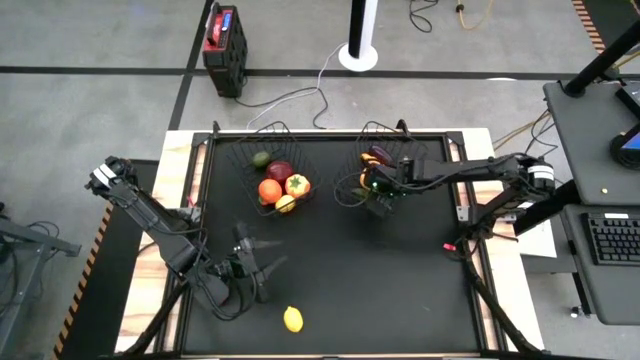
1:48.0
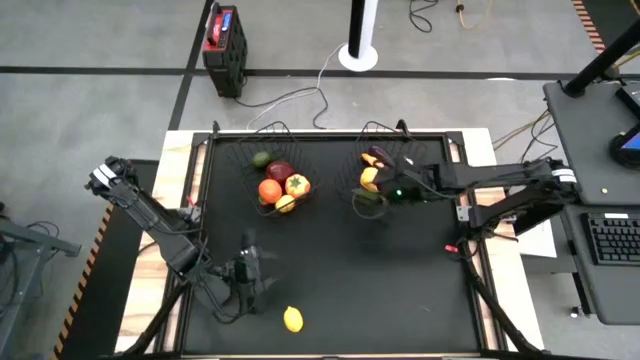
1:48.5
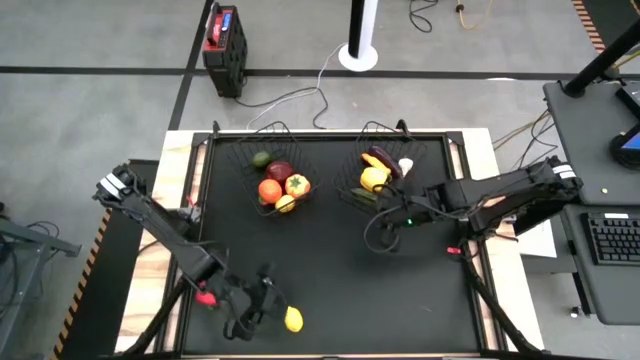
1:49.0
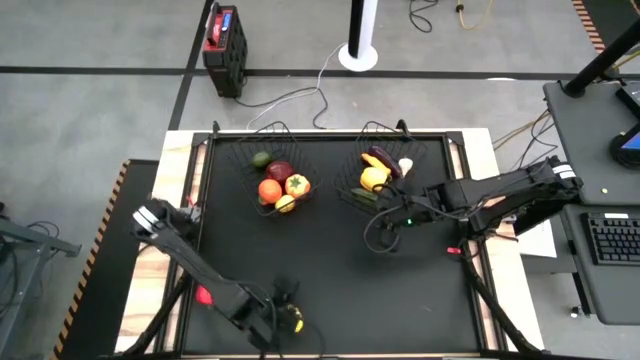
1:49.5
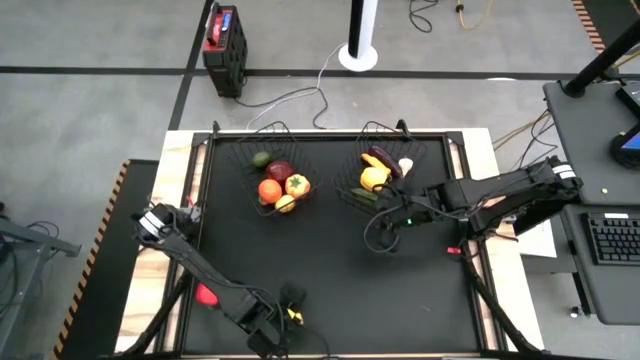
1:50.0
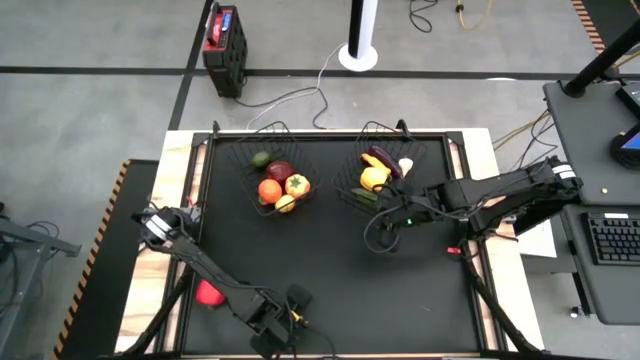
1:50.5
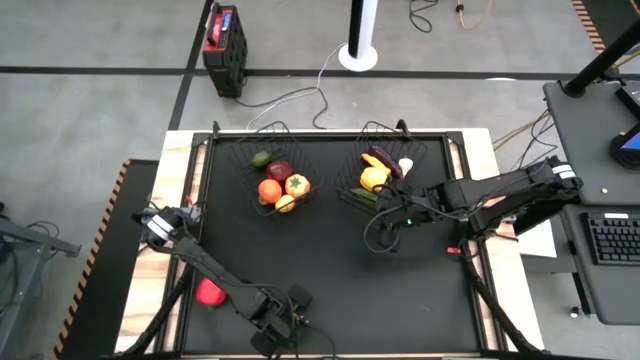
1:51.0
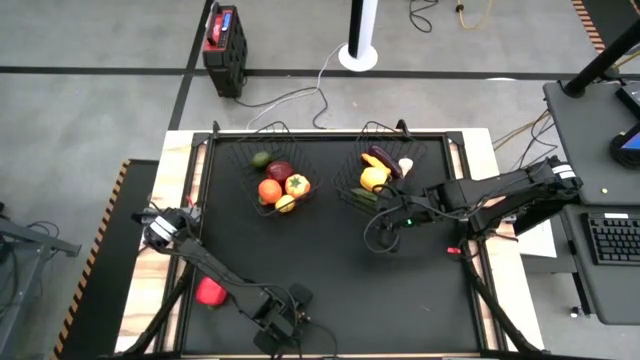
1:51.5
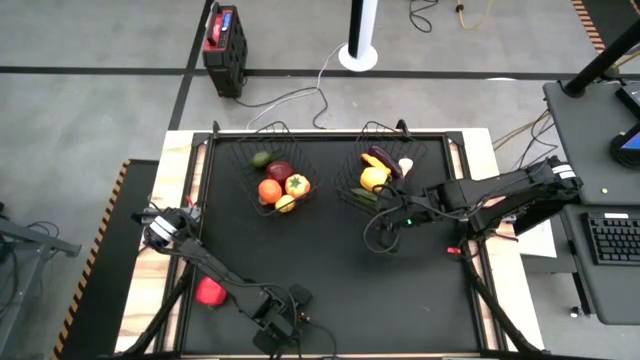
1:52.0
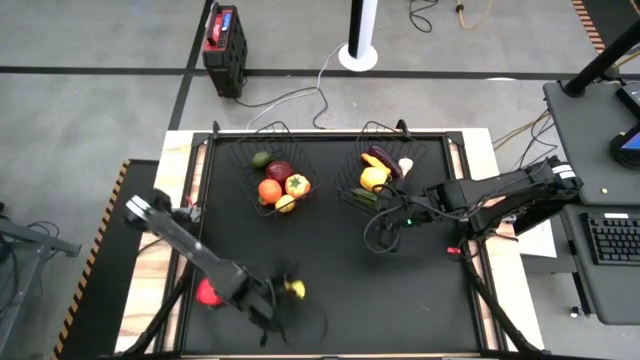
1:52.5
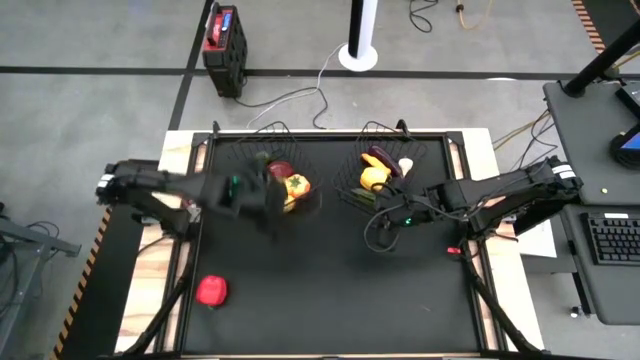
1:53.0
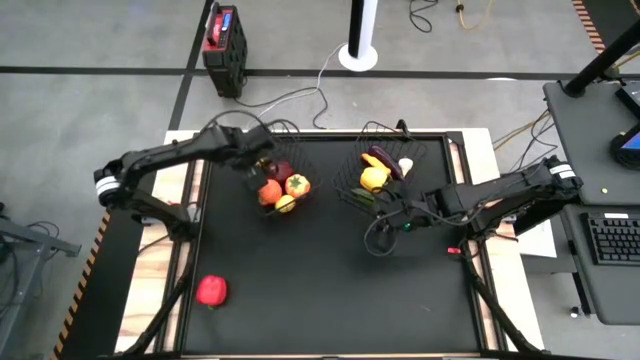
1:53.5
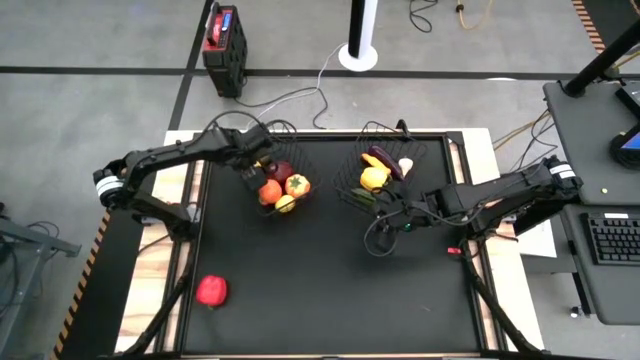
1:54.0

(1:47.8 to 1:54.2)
Task: Sort produce into baskets
Put the lemon into the left black wire basket

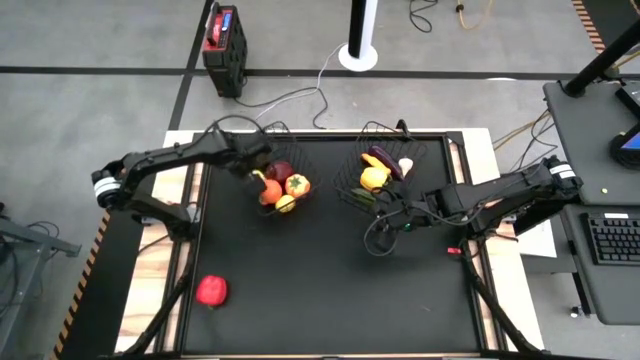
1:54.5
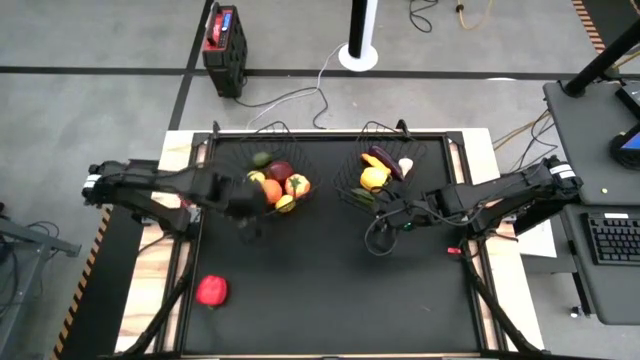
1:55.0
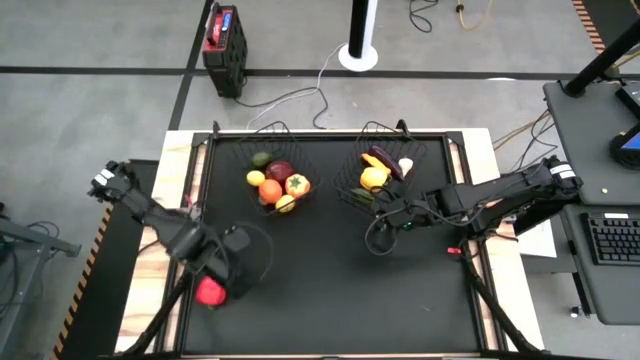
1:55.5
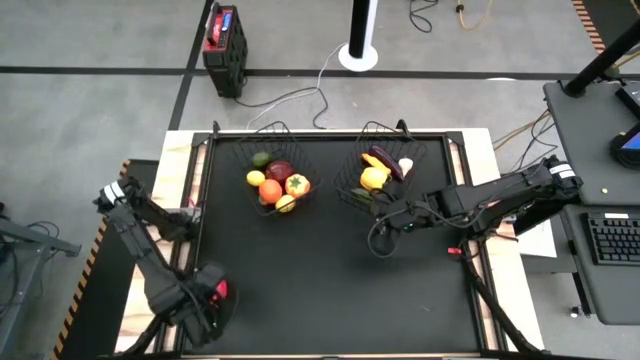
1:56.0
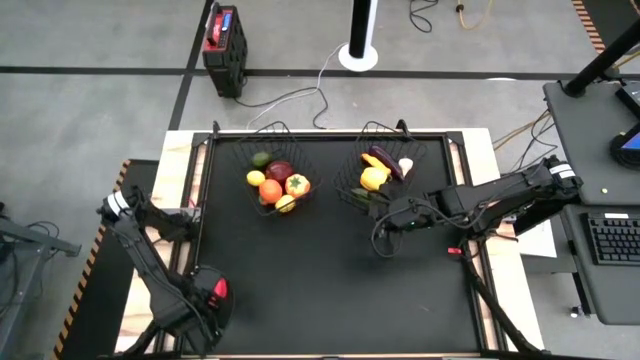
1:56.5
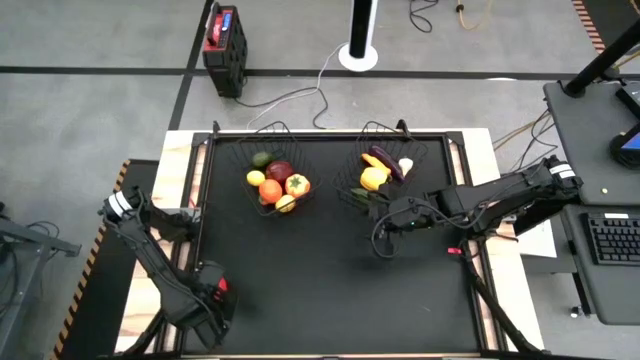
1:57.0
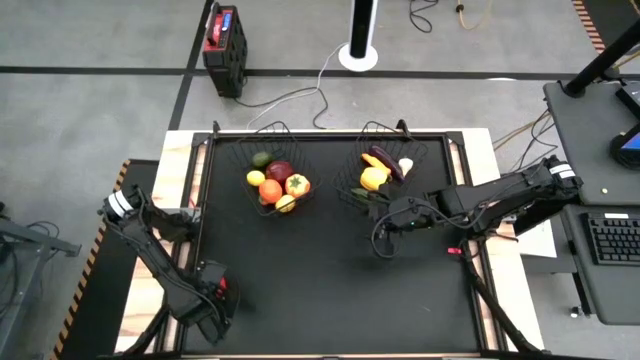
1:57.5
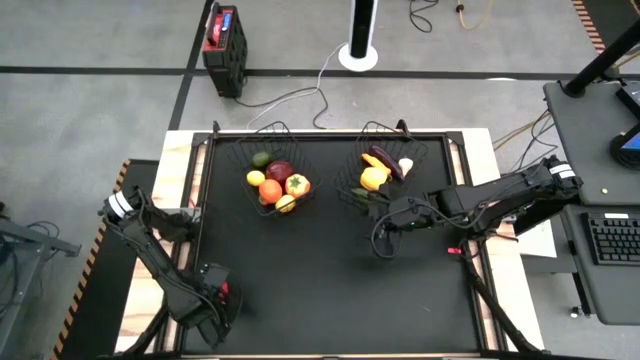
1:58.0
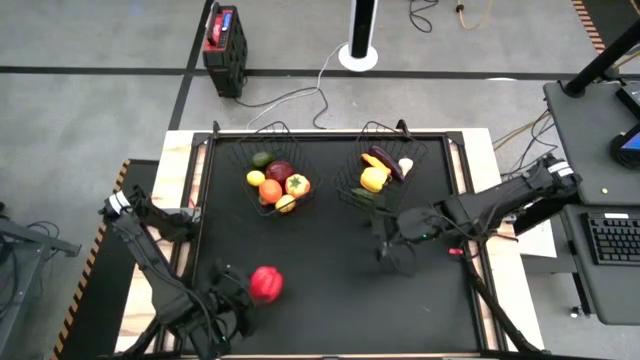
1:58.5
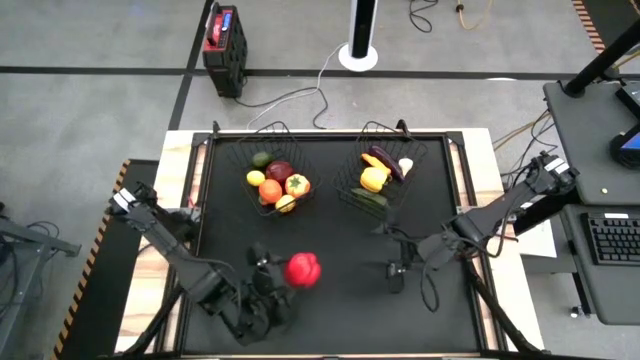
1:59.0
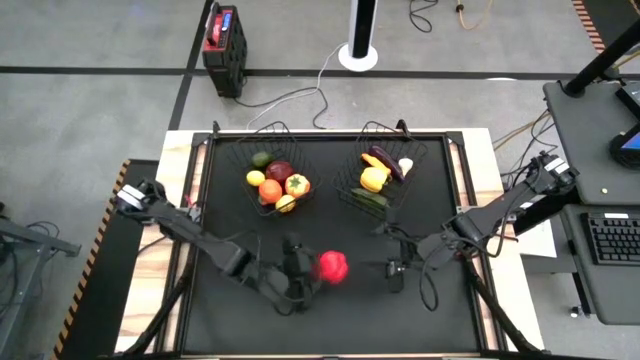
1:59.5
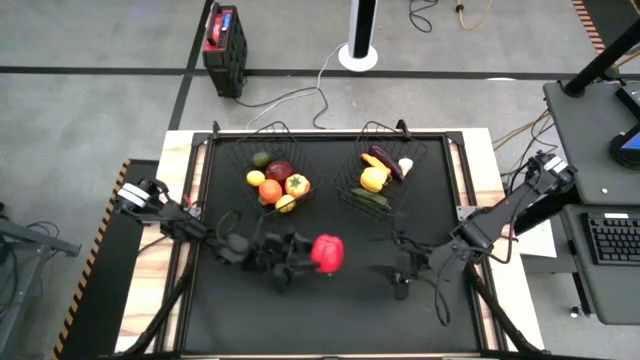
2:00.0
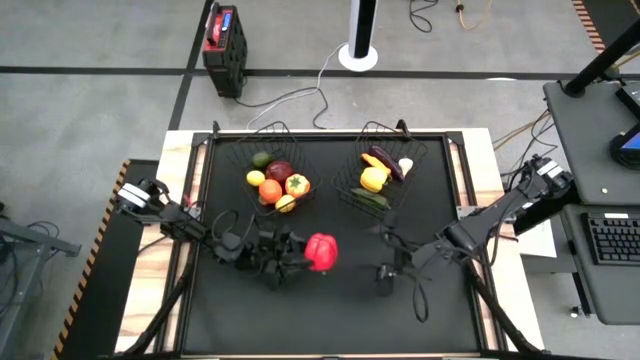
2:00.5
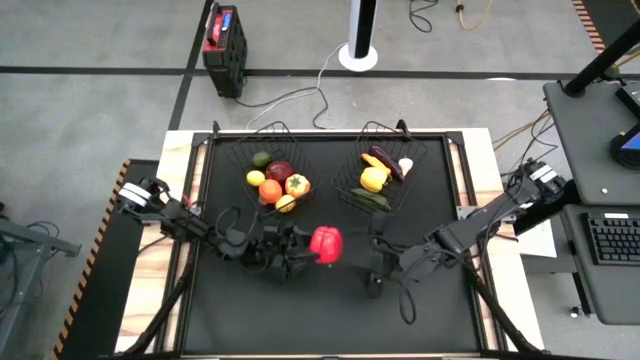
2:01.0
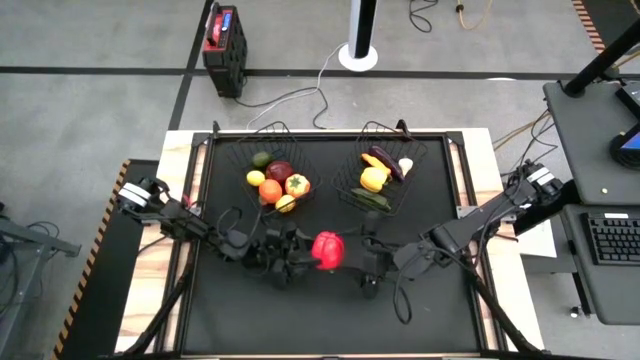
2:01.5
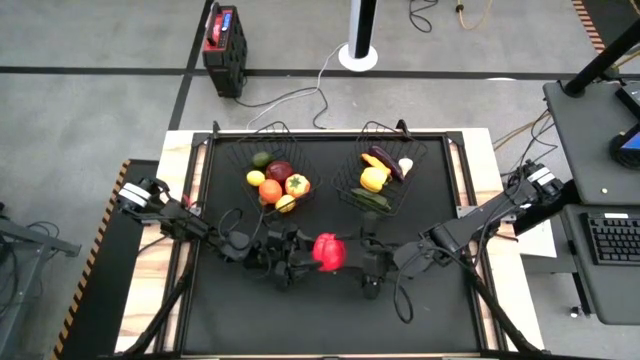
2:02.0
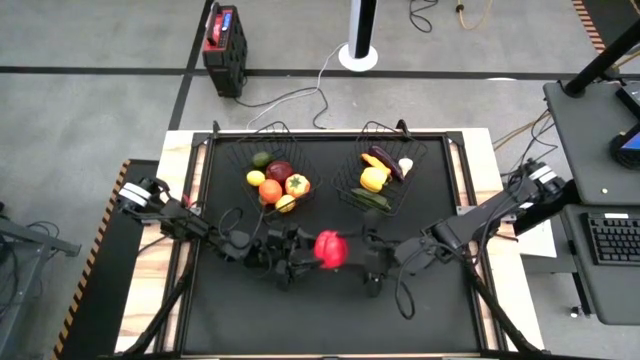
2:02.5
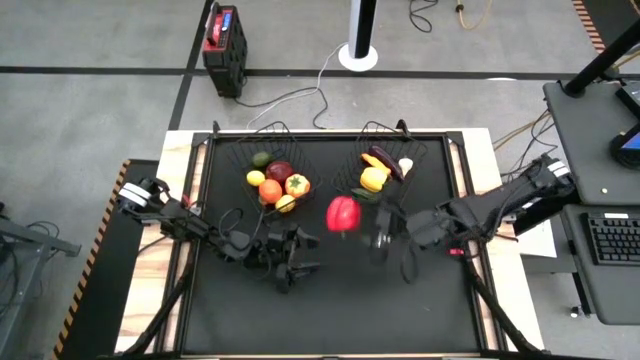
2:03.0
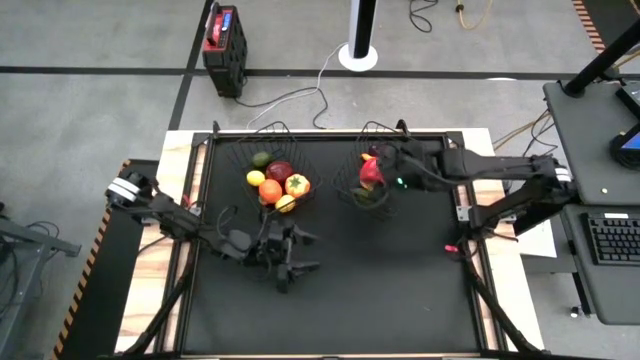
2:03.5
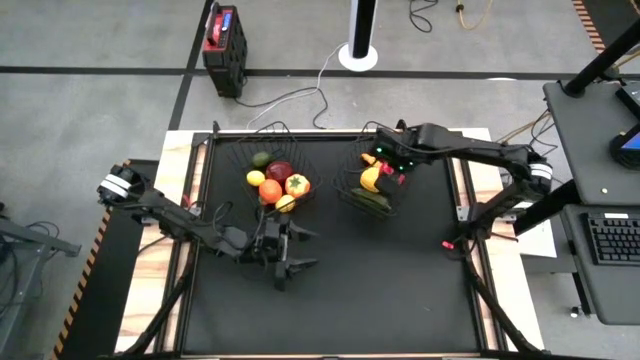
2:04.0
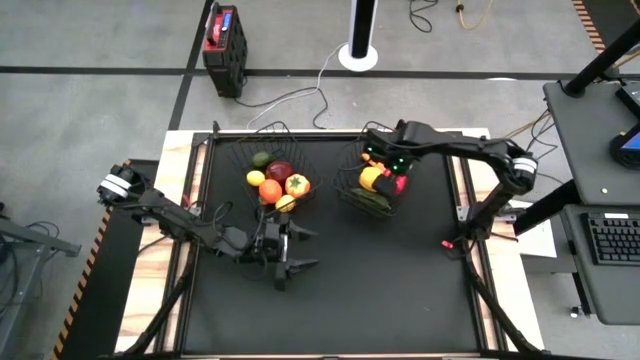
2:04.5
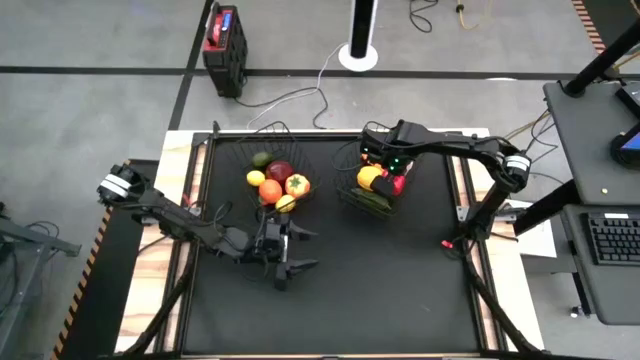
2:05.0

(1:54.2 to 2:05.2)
Put the red bell pepper into the right black wire basket

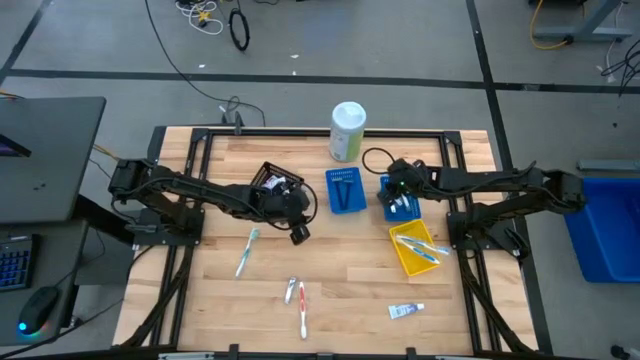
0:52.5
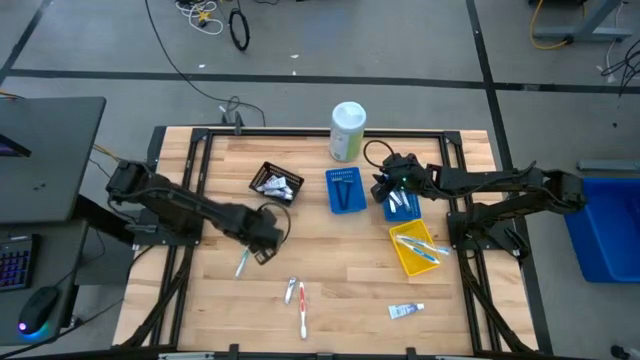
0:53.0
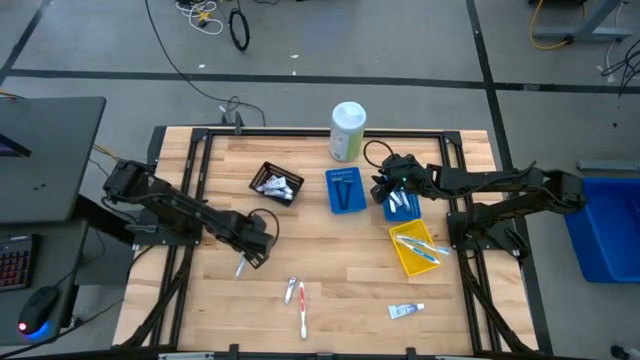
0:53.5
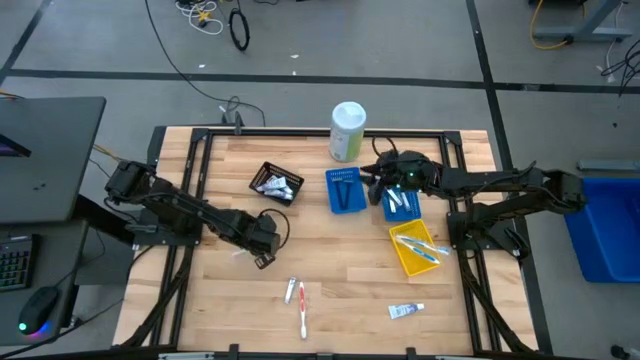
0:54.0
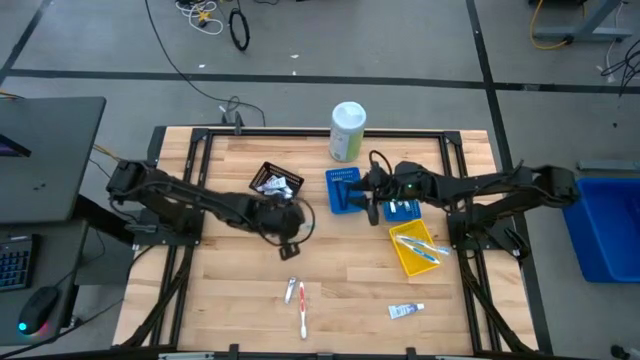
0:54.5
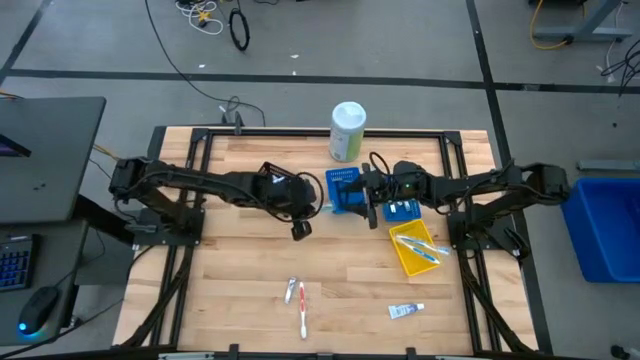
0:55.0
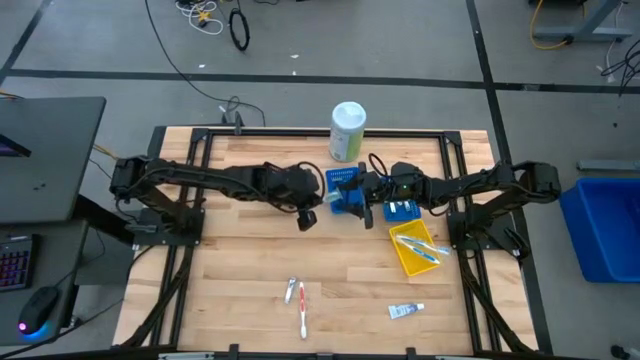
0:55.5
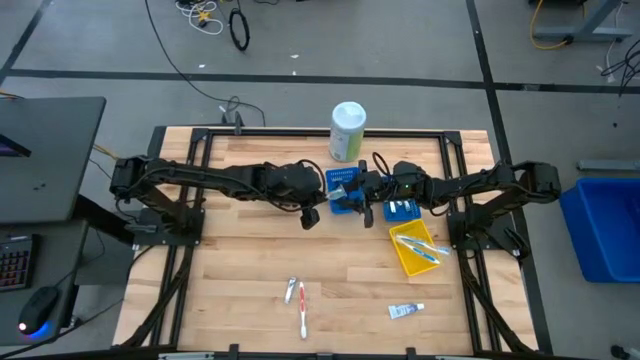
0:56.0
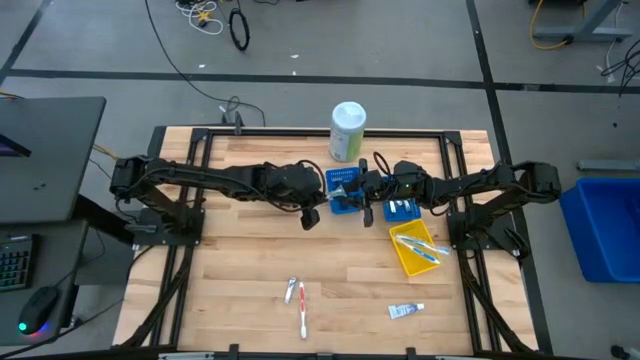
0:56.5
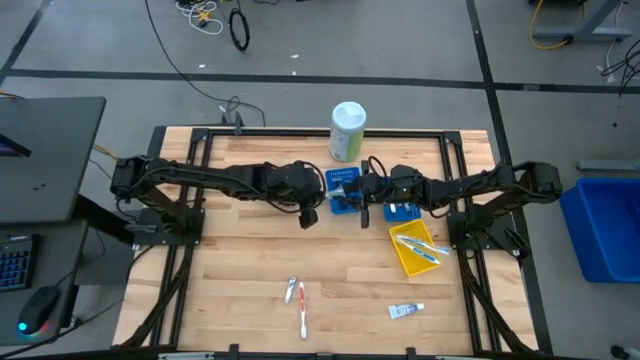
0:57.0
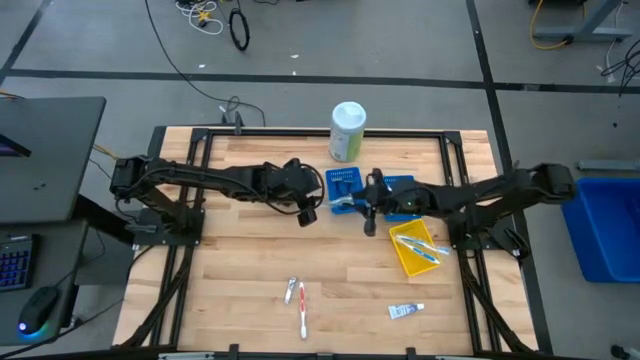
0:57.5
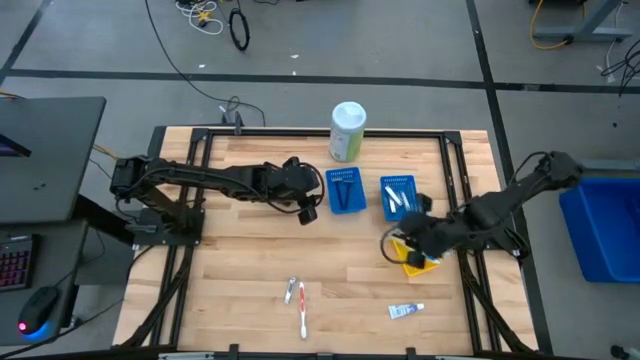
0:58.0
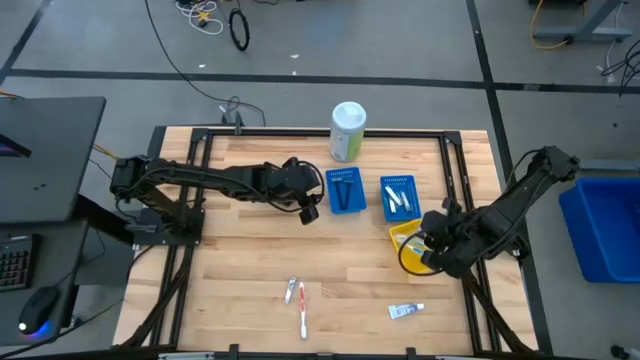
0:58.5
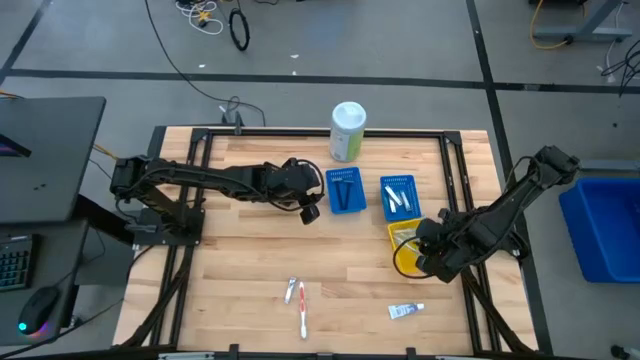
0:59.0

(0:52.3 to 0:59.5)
Task: Pick & Place Travel size toiletries
Put the green toothbrush into the yellow basket
